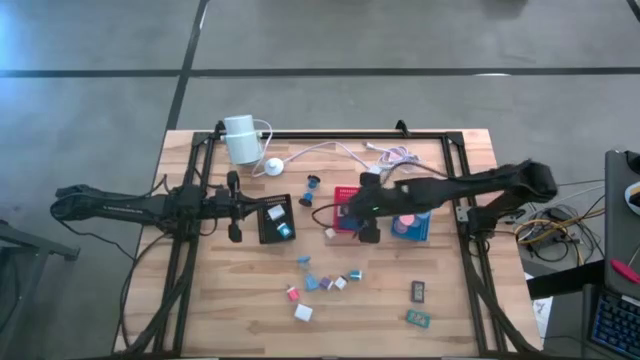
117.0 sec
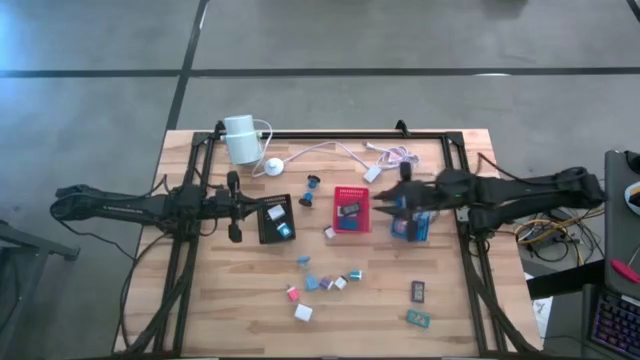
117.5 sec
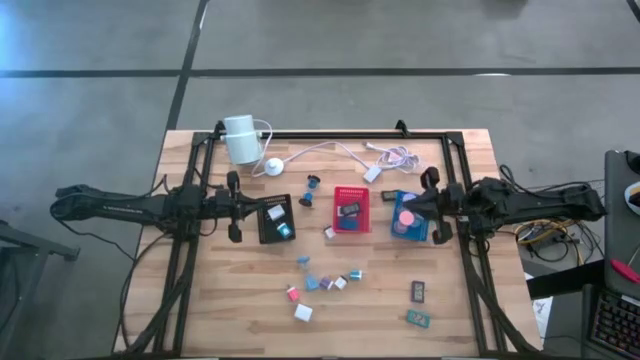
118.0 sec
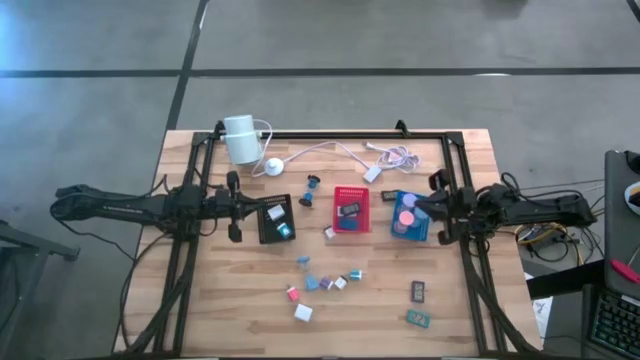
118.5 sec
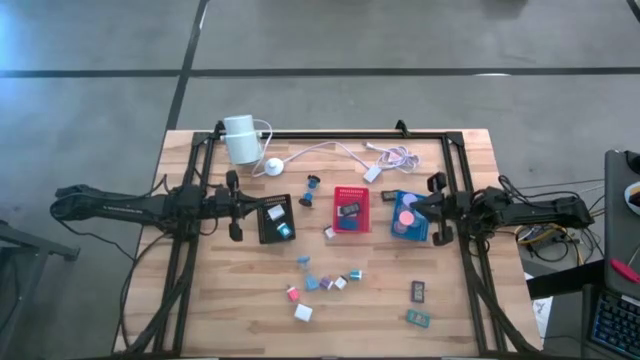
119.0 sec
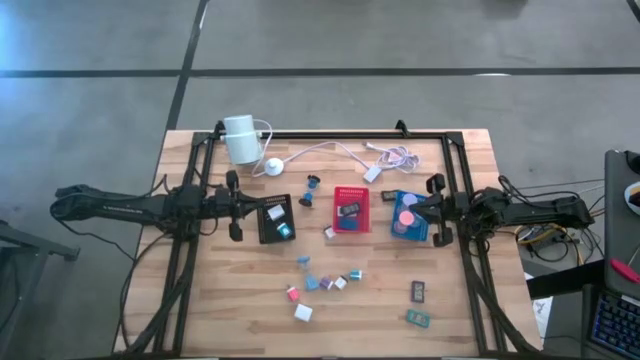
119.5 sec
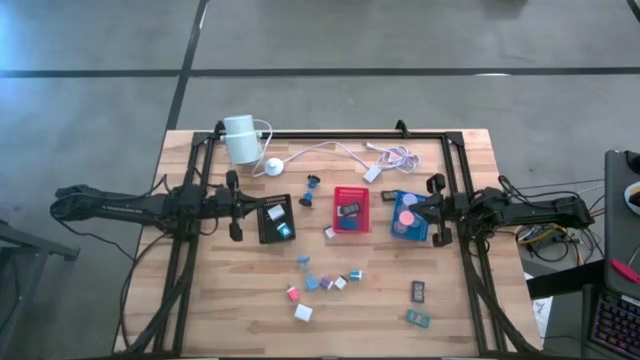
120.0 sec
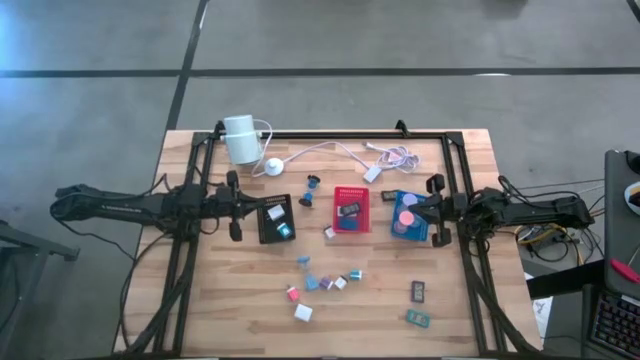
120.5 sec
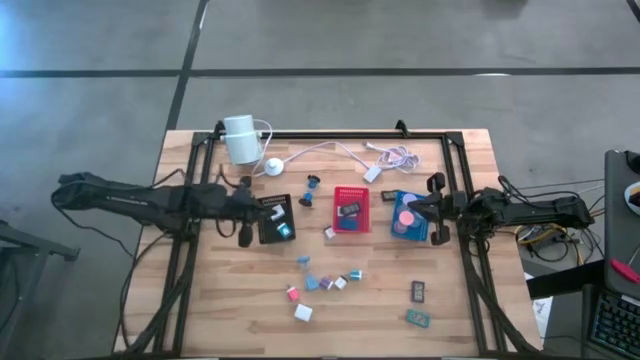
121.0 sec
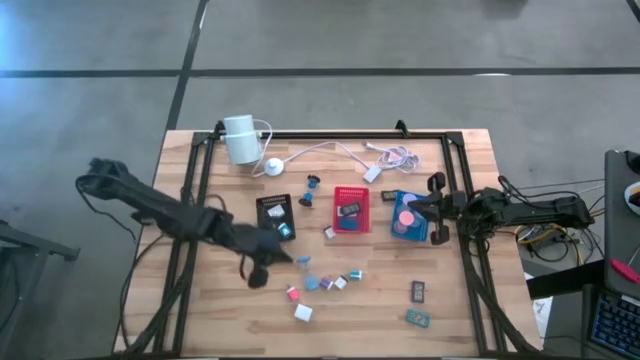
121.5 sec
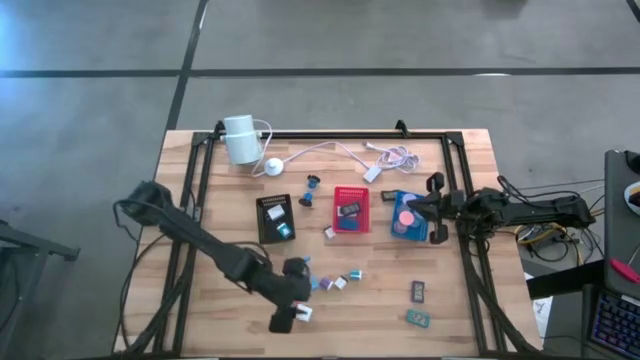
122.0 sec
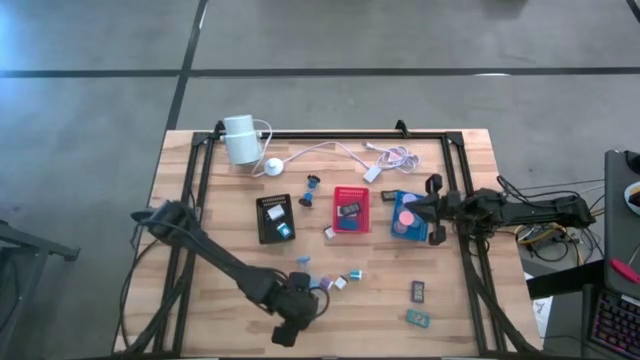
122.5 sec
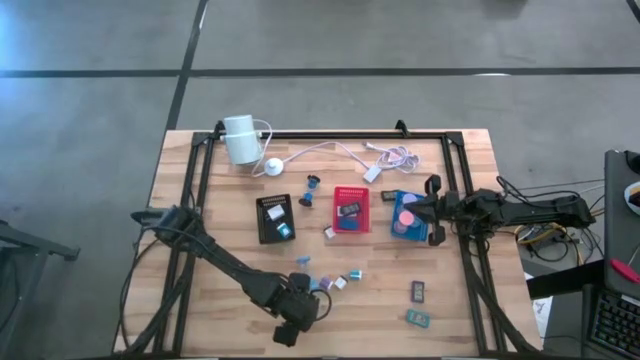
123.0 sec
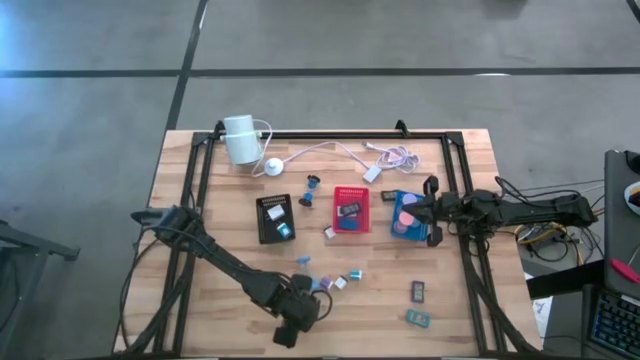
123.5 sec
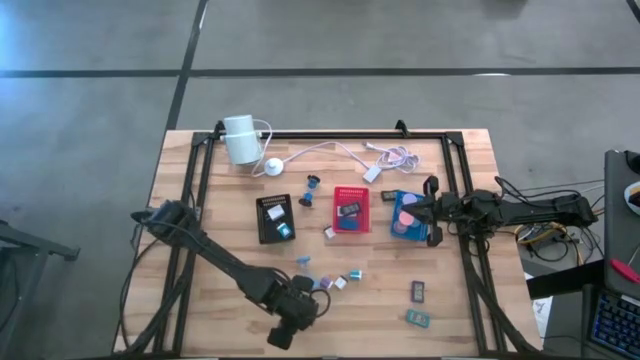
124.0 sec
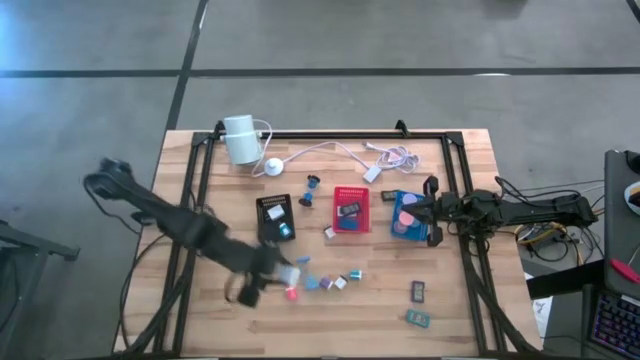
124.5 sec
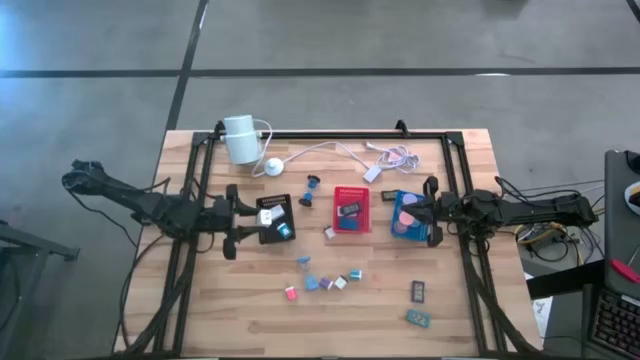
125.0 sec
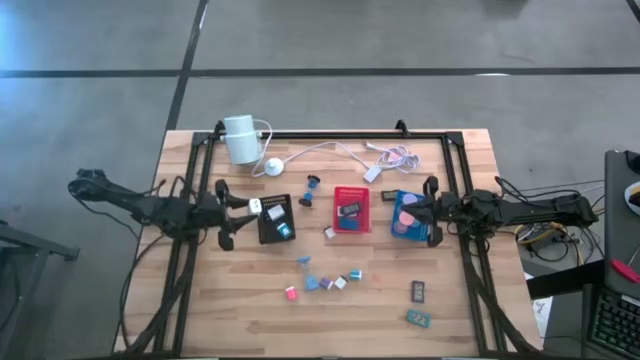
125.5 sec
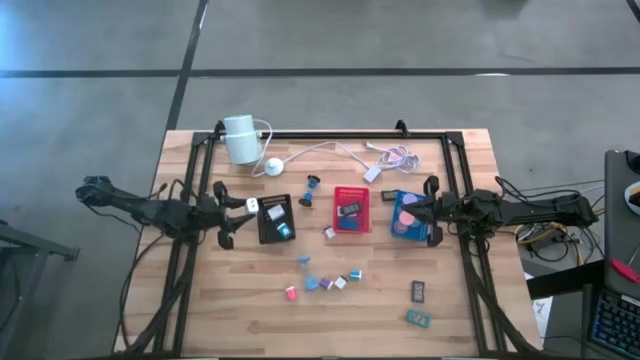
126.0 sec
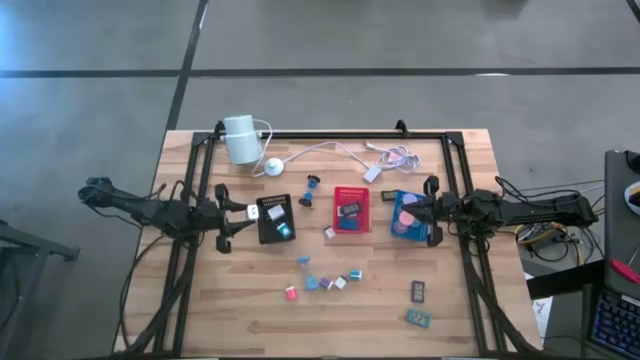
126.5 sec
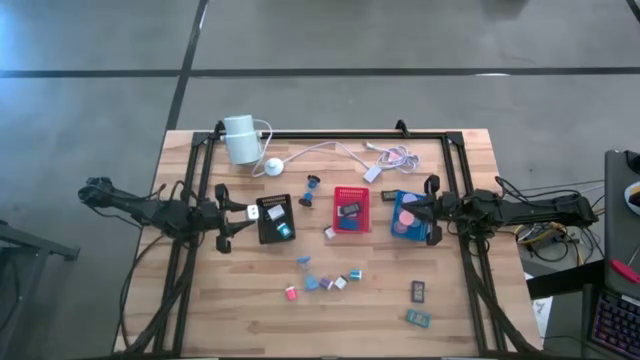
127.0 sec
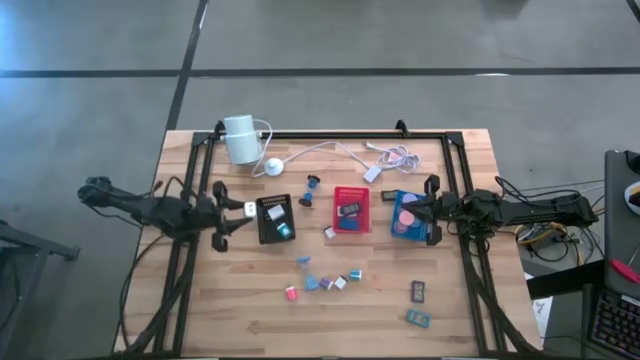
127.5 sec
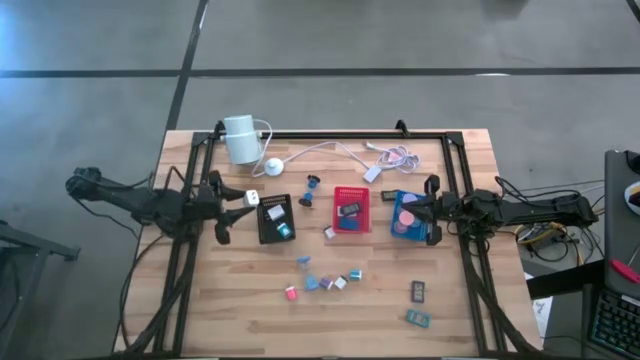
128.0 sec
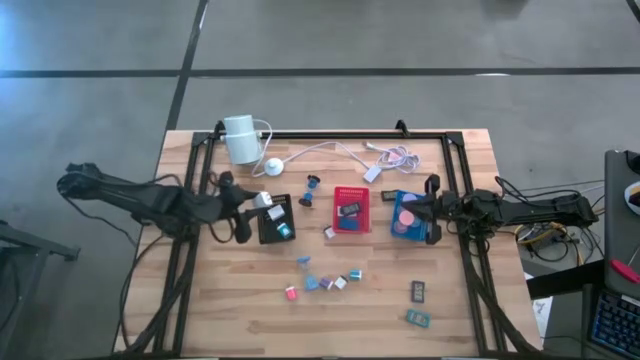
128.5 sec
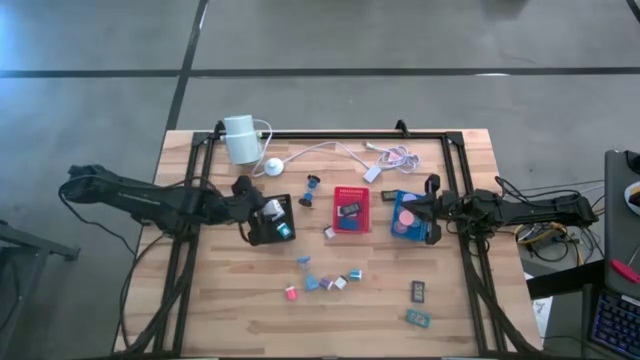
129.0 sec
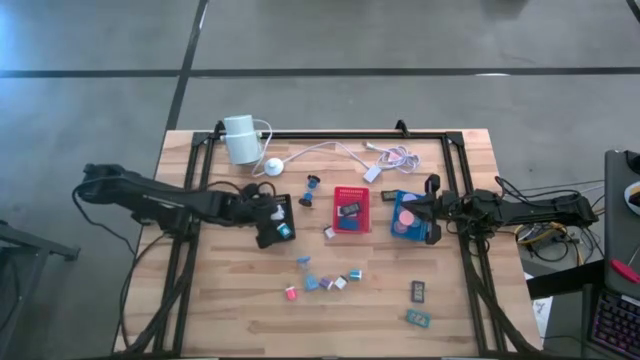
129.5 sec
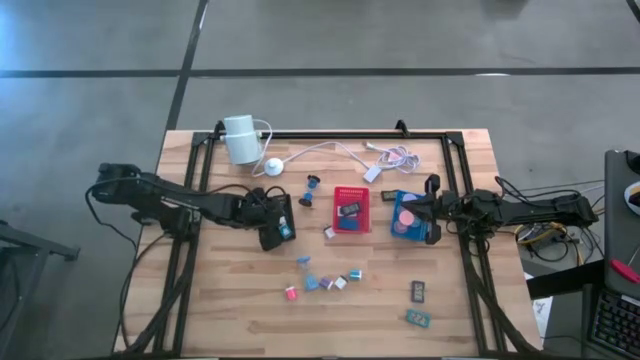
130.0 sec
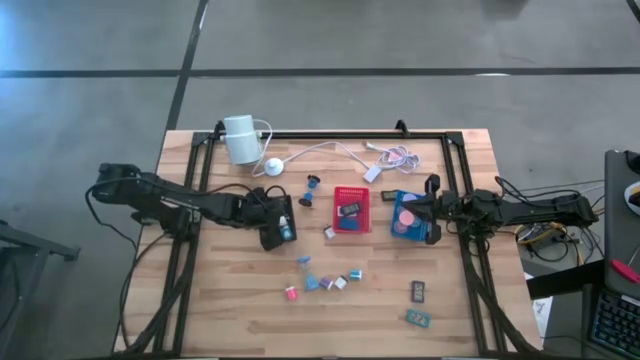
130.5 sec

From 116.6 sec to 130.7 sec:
Task: Pick & Place Office items
Put the white charger adapter into the black bin

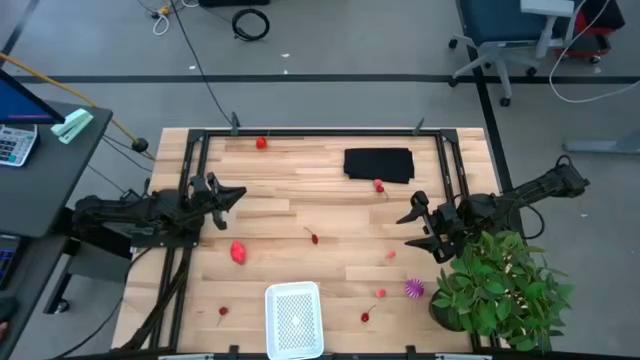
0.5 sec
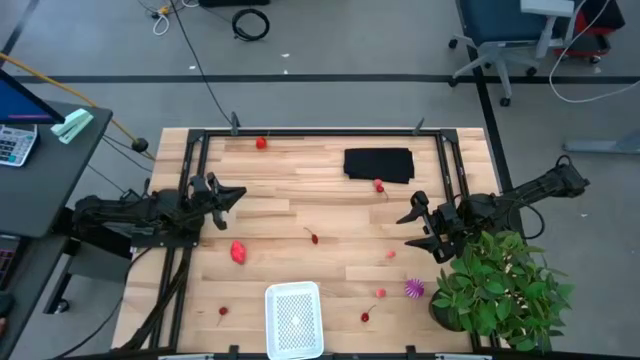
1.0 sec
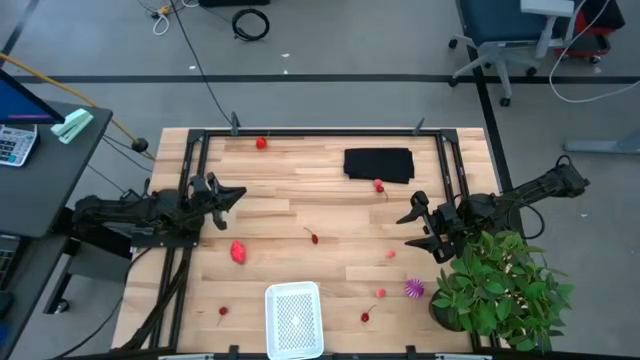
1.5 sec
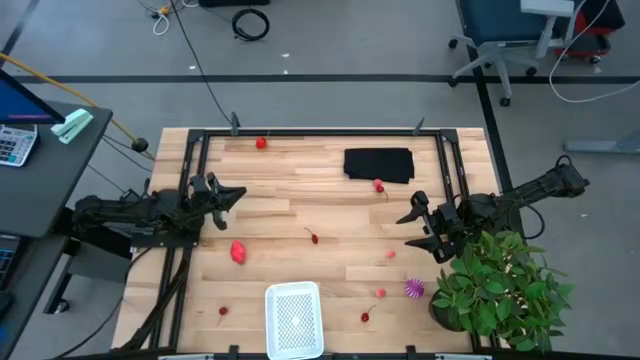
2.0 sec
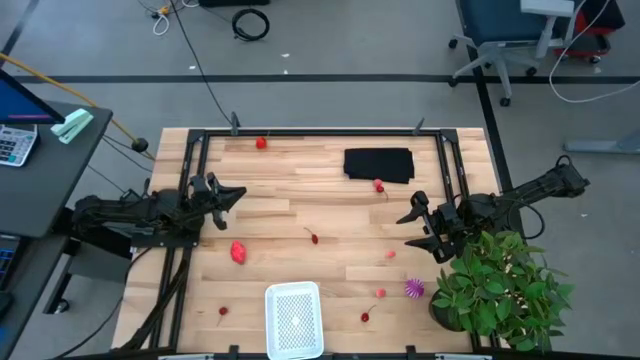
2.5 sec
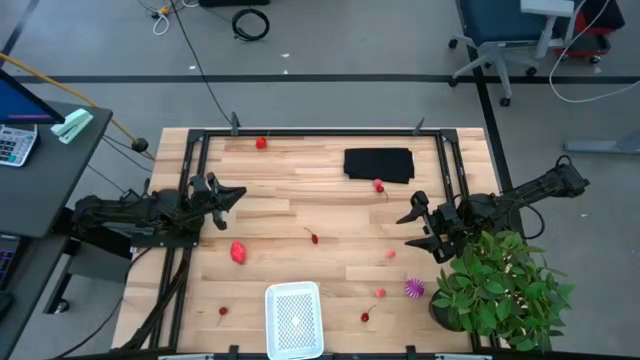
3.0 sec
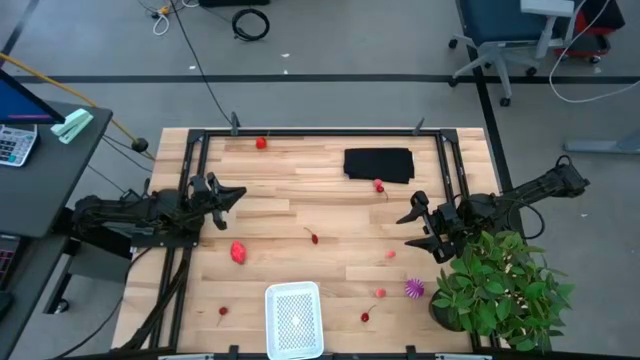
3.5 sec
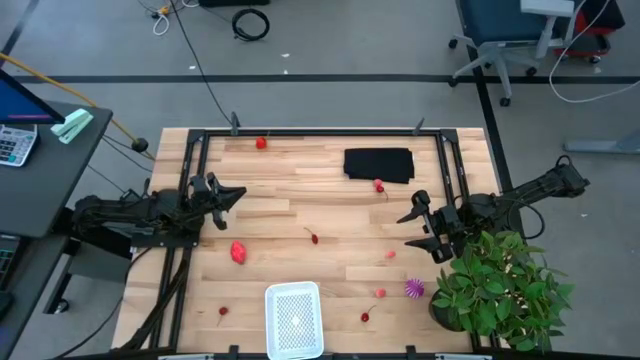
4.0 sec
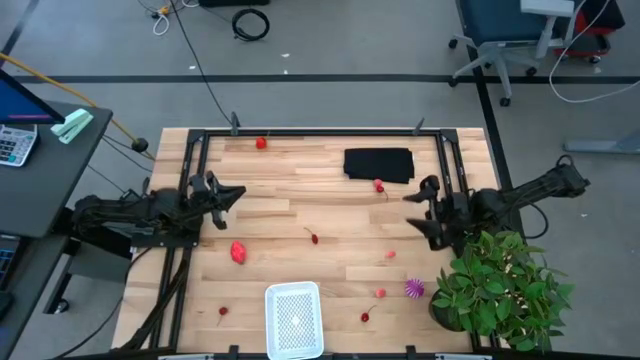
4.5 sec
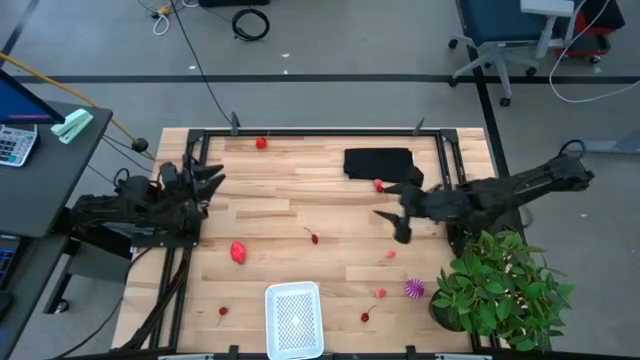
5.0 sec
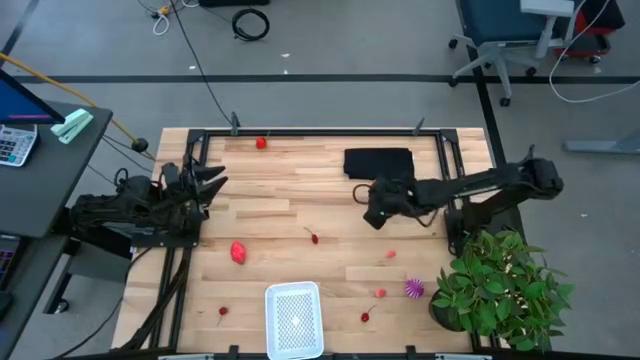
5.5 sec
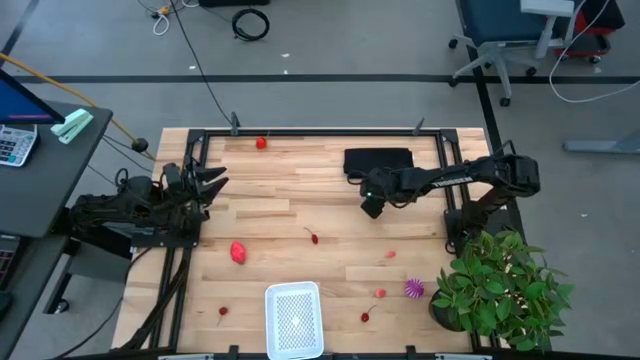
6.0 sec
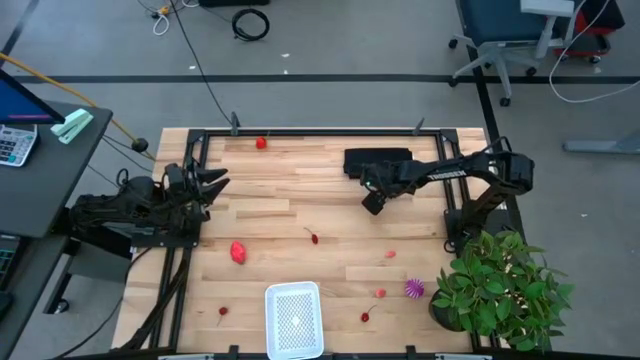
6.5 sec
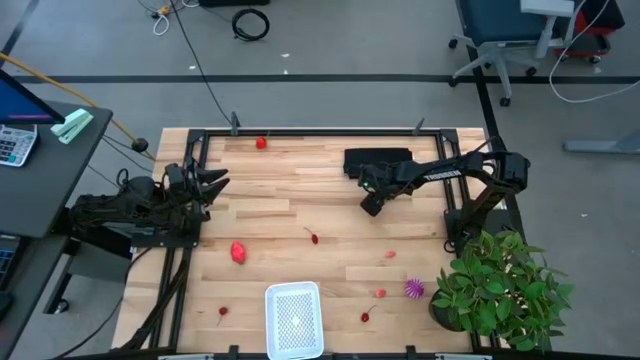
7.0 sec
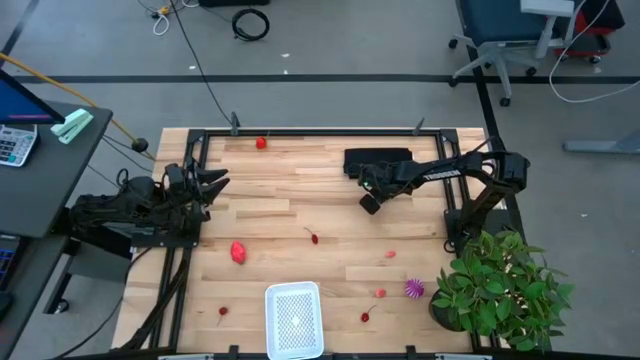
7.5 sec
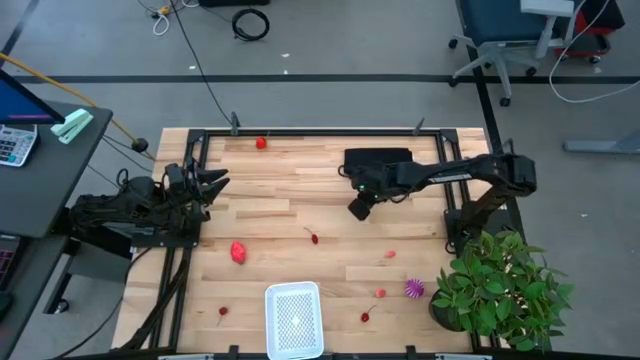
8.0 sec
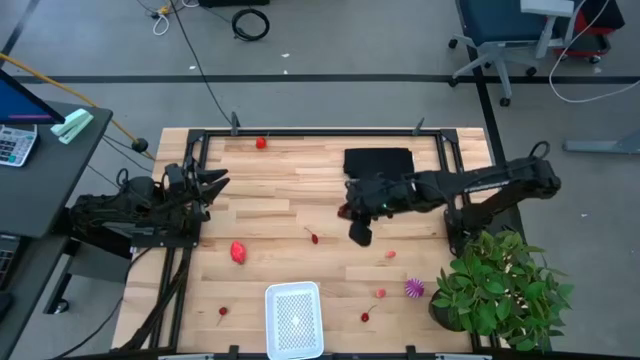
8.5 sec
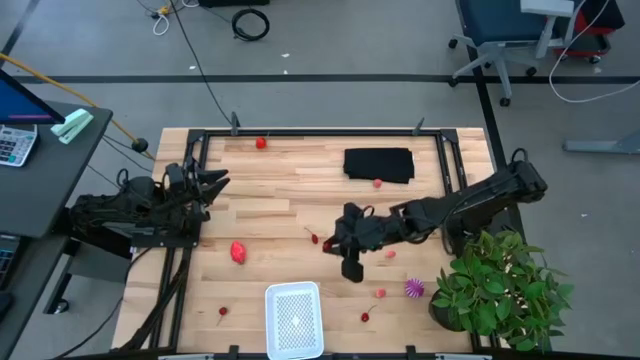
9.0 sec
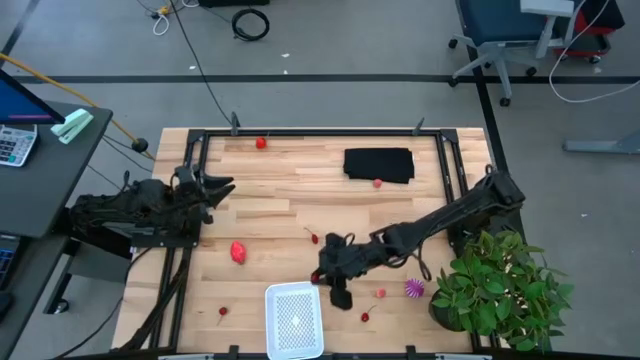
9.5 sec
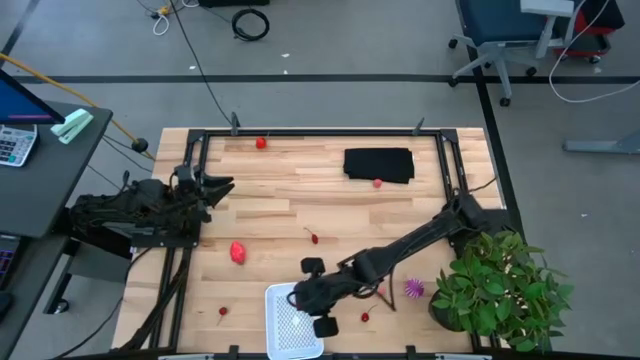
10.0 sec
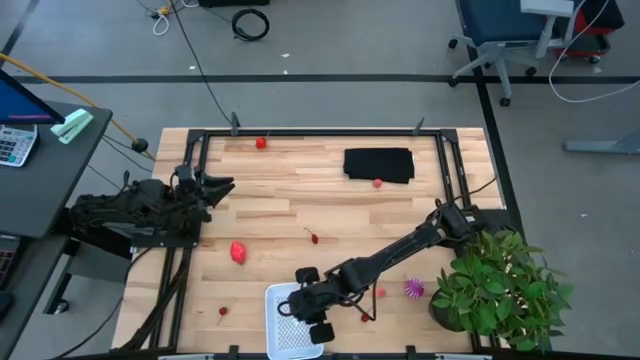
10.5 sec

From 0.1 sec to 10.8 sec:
Task: Pick and placing Produce into tupperware
Put the top cherry into the white basket
